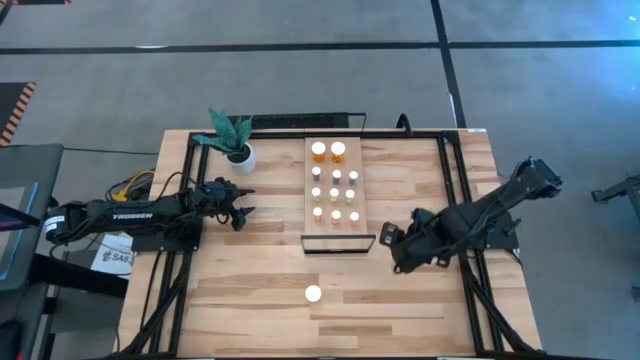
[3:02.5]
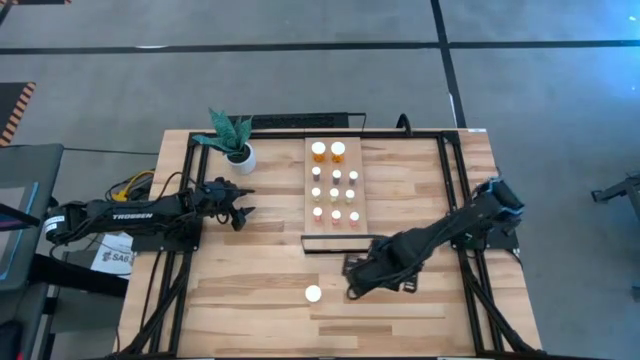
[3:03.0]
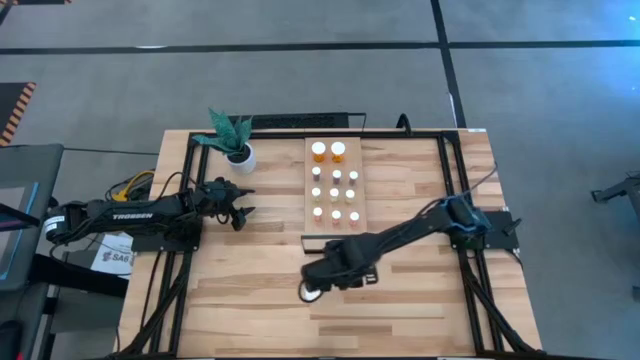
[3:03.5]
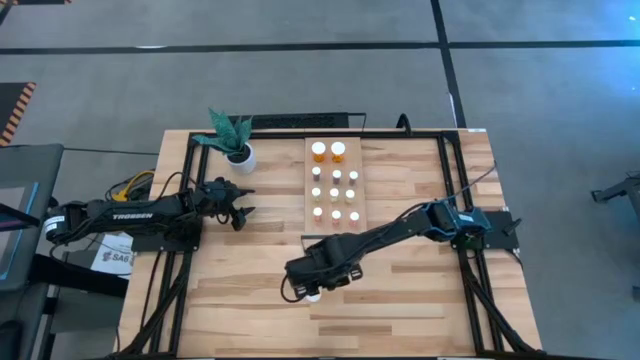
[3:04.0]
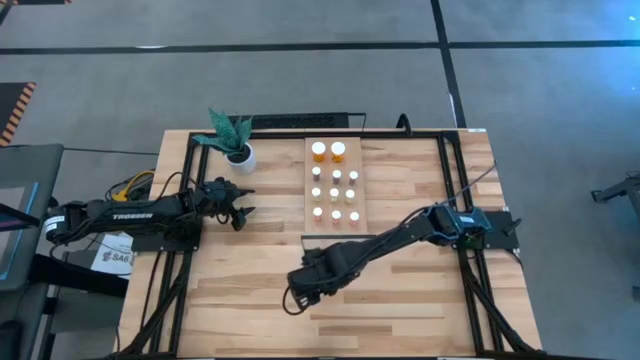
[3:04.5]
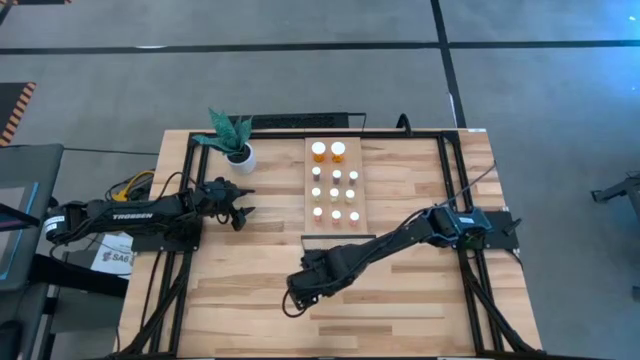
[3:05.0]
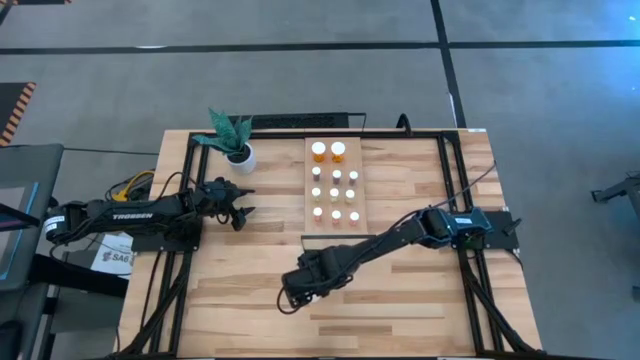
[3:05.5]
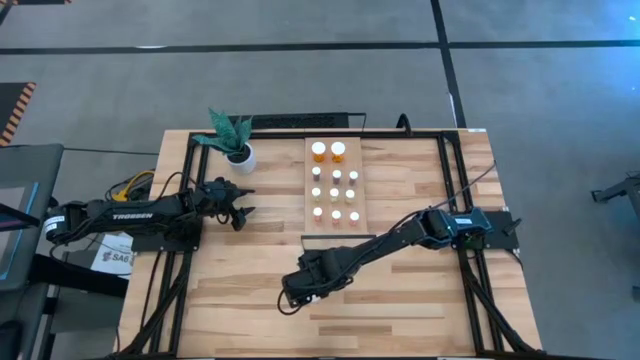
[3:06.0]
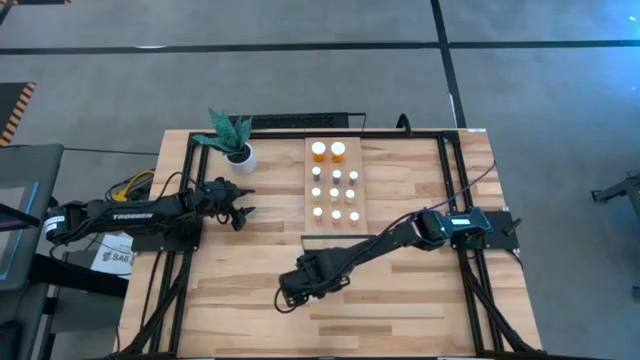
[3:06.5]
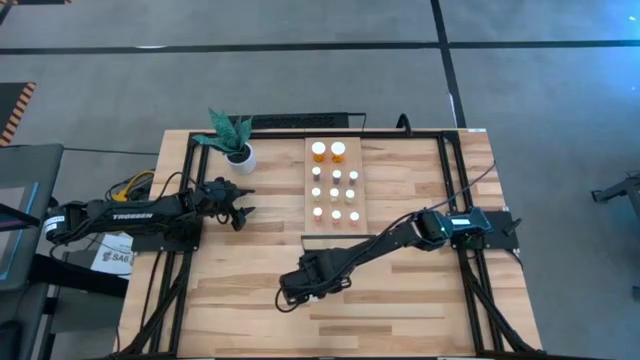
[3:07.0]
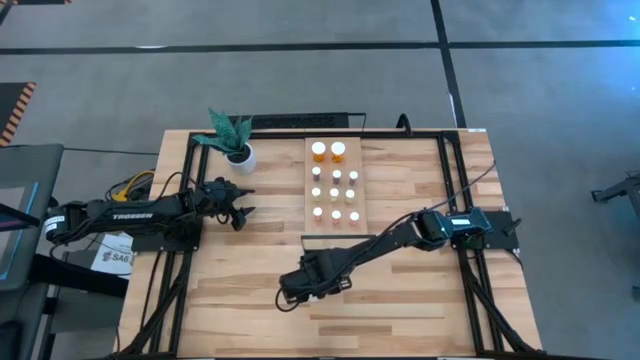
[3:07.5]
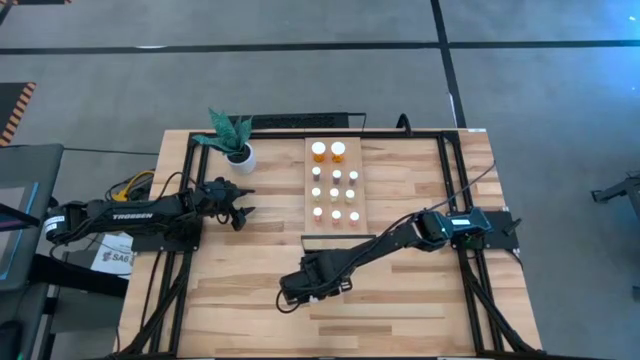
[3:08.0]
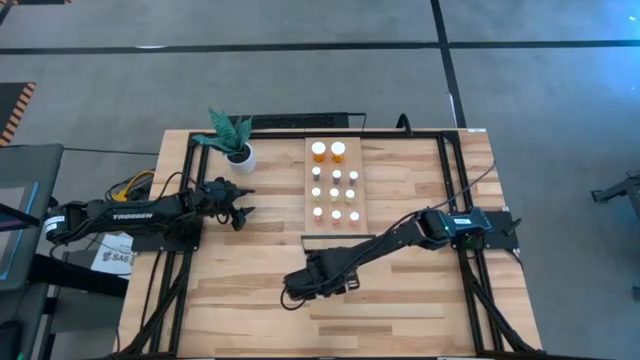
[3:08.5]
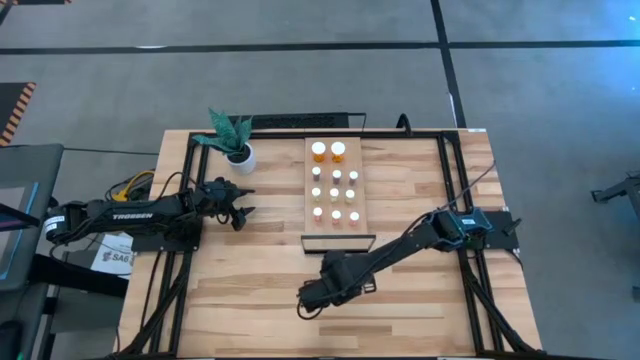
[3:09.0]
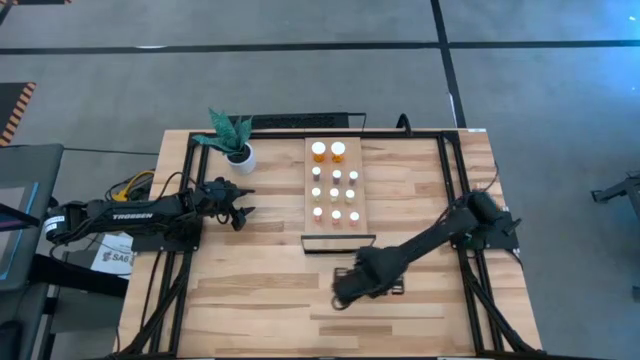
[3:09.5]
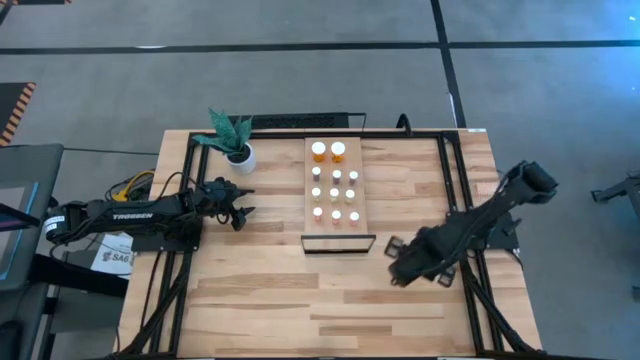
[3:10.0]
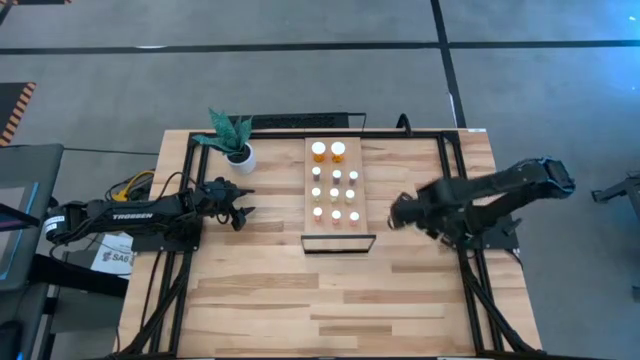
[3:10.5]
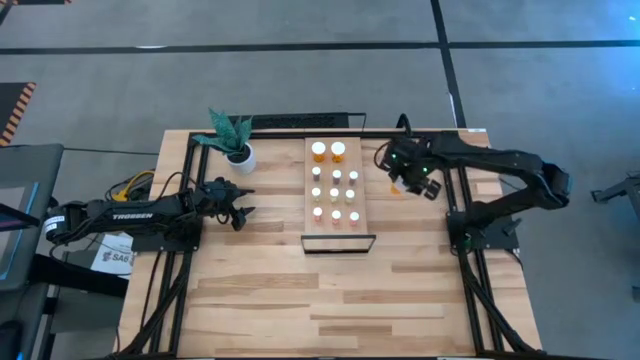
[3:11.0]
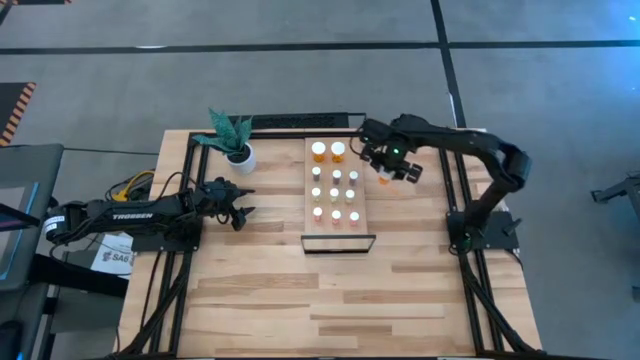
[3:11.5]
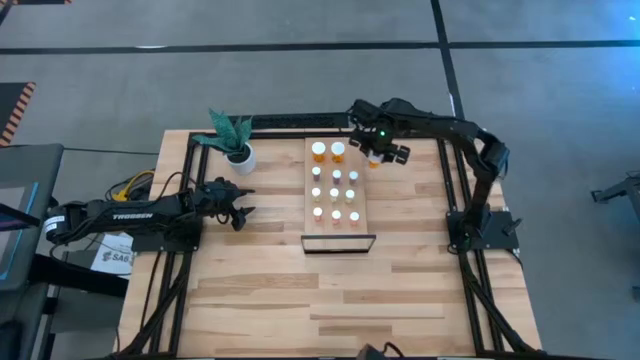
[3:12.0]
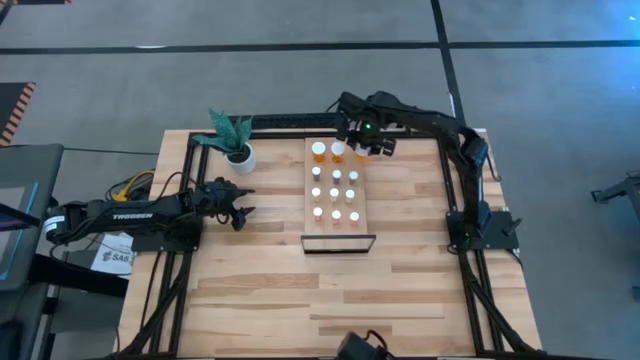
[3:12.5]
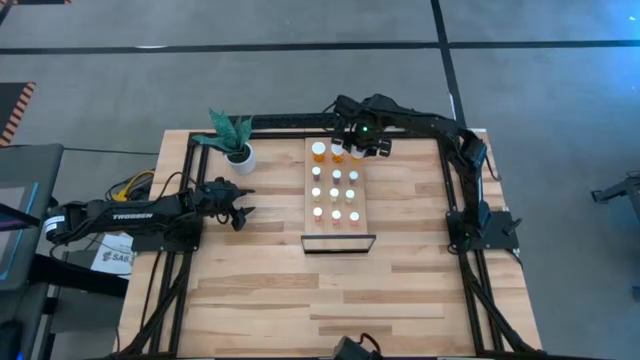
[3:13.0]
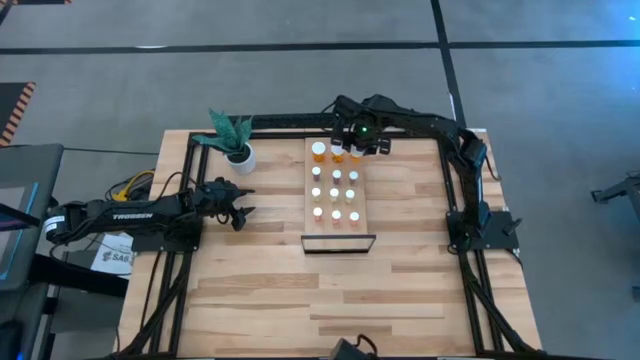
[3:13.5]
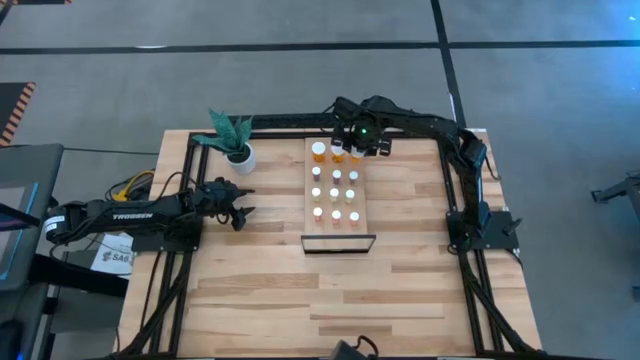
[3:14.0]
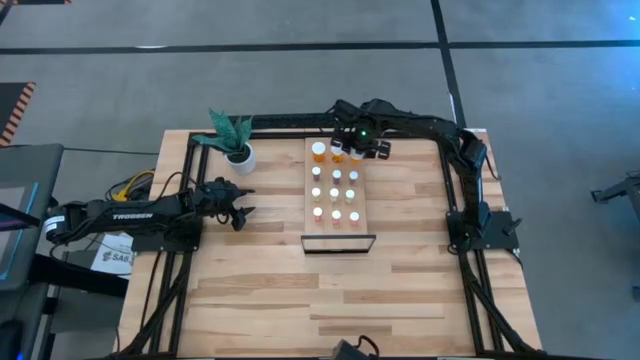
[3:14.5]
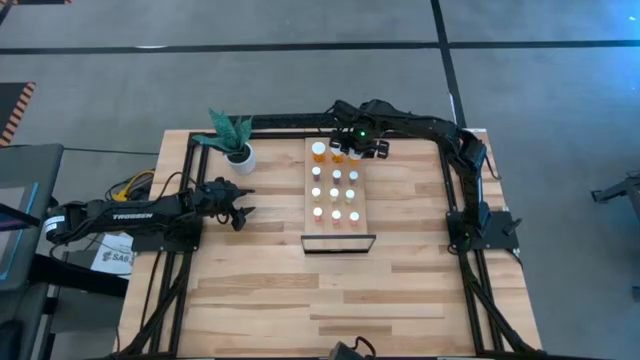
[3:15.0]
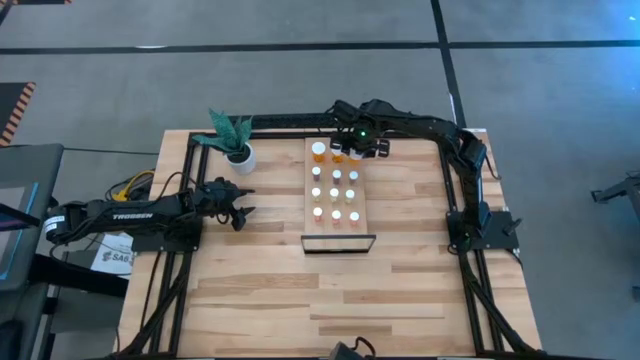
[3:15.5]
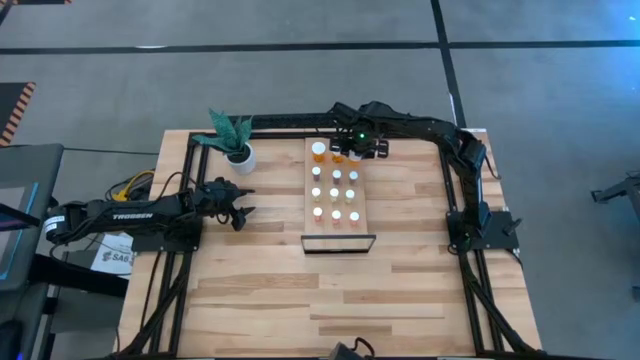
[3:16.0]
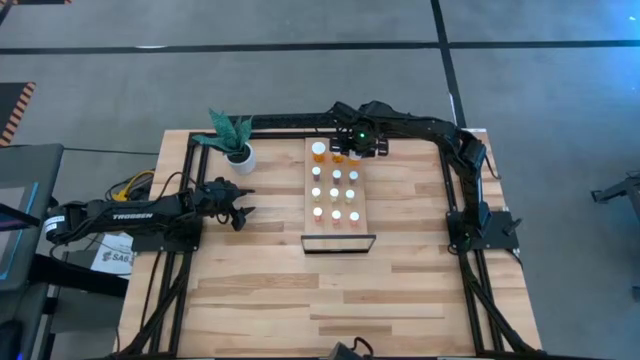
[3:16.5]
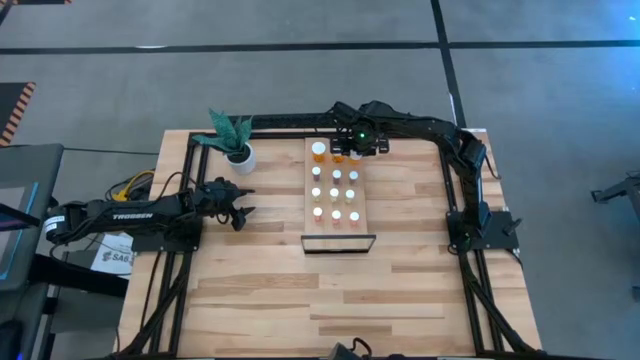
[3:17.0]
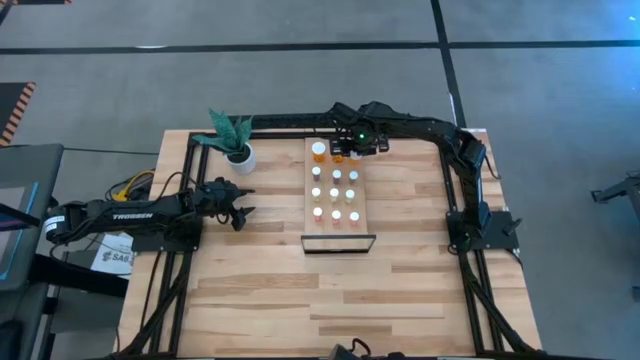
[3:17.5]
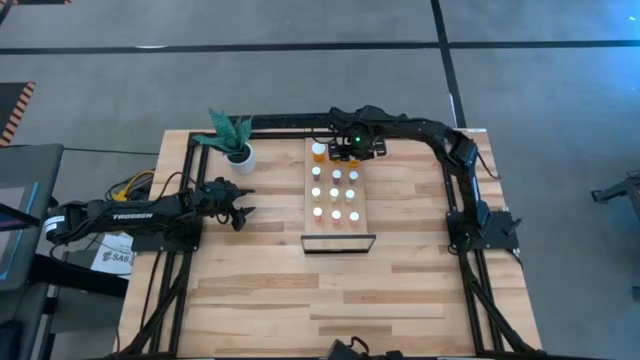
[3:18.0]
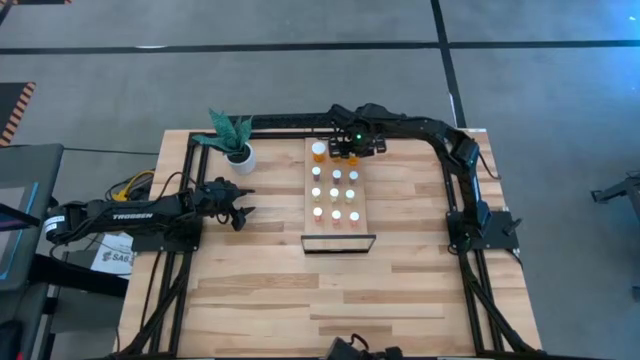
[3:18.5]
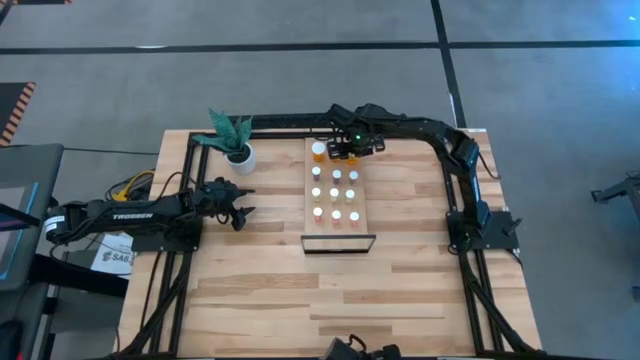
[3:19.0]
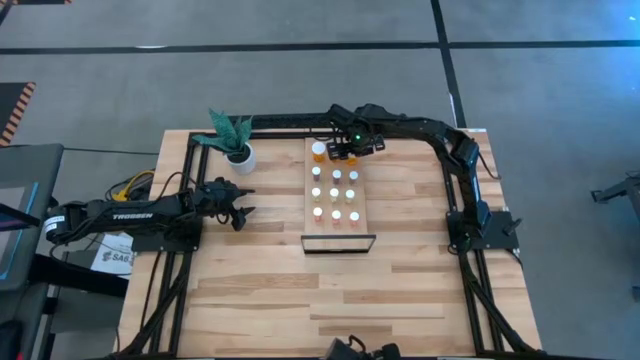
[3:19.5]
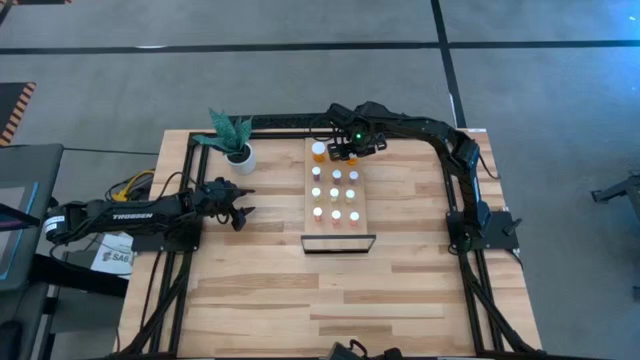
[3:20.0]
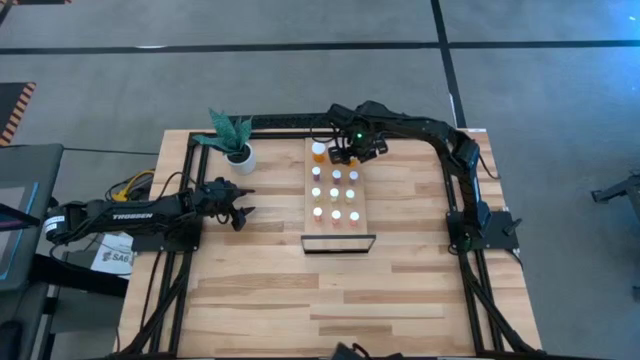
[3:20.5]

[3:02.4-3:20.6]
Task: Pick and place medicine bottles onto shelf by color
Put the orange pill bottle on the shelf aligned with the other orange pill bottles

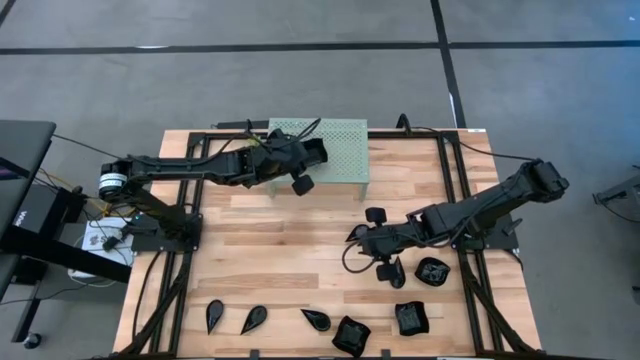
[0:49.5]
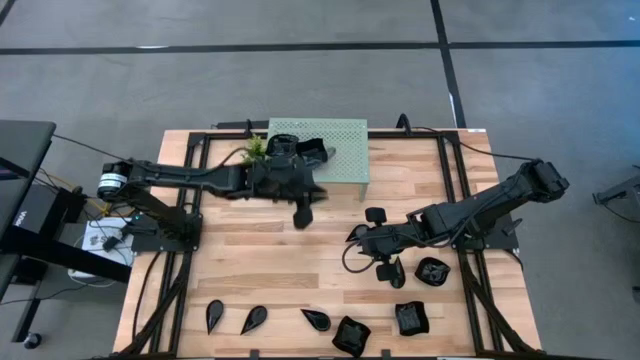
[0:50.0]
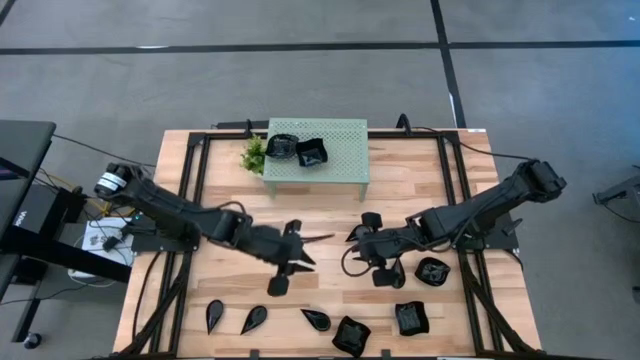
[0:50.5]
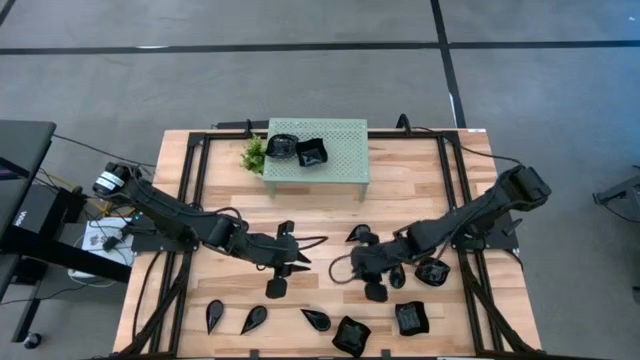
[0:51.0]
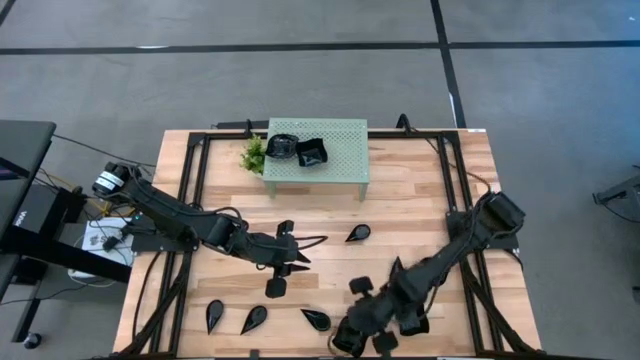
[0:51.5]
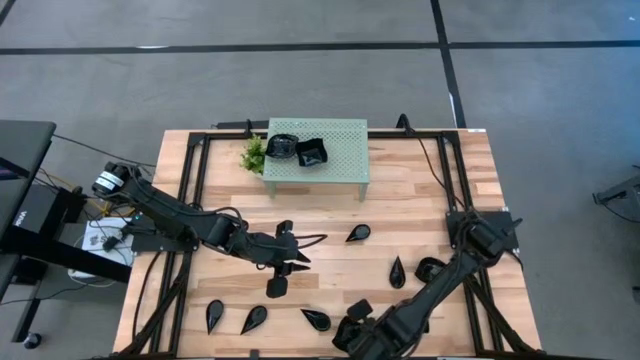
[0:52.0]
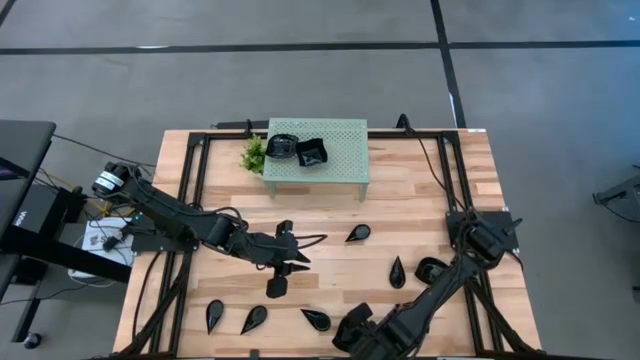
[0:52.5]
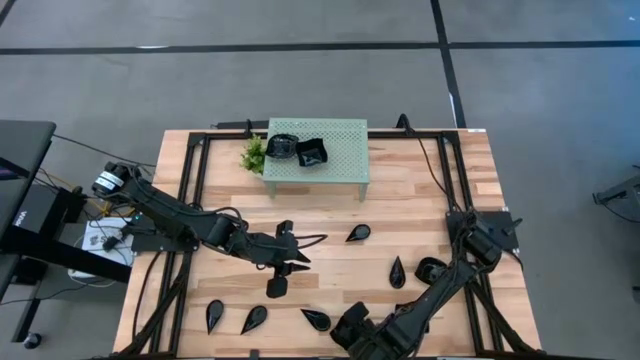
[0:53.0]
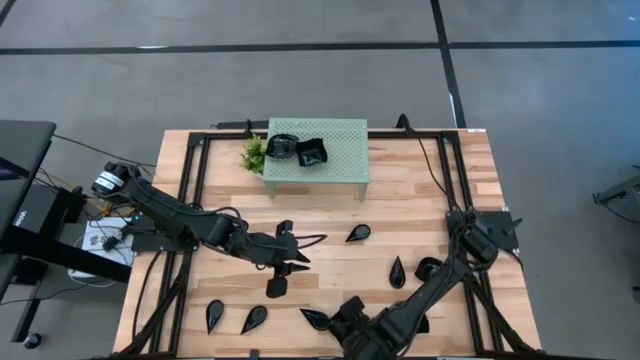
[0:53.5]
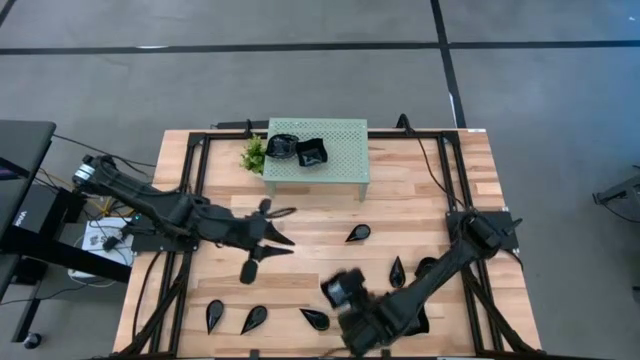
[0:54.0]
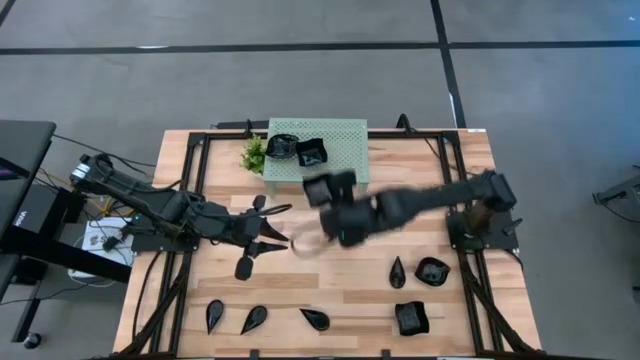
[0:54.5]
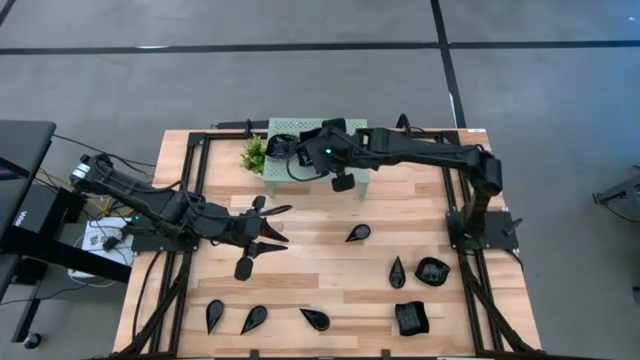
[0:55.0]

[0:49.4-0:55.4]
Task: Pick & Place Mini shaped plates
Stack the distorted square plate on top of the other distorted square plates on the shelf
